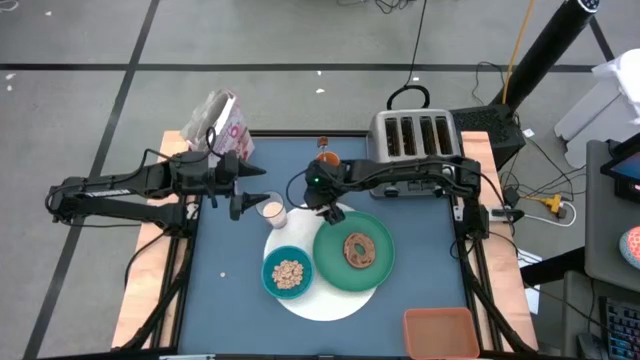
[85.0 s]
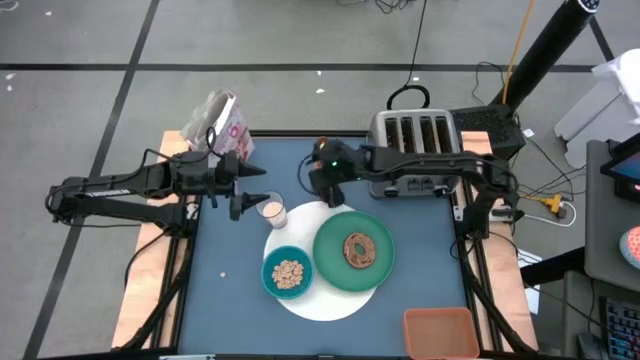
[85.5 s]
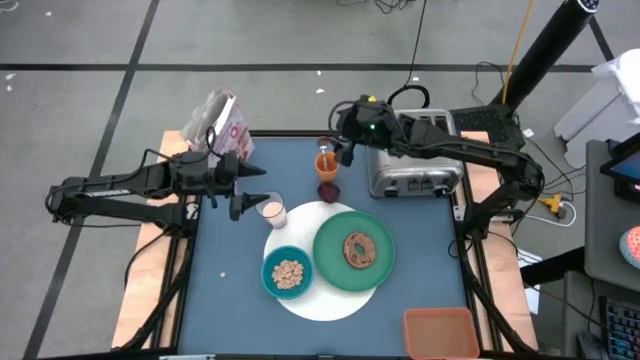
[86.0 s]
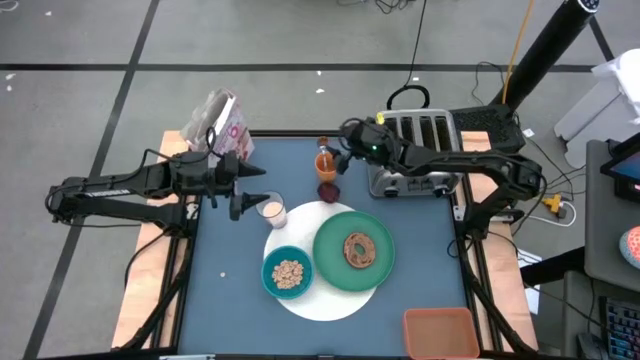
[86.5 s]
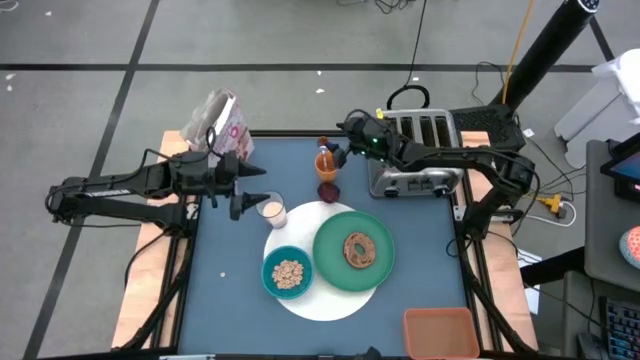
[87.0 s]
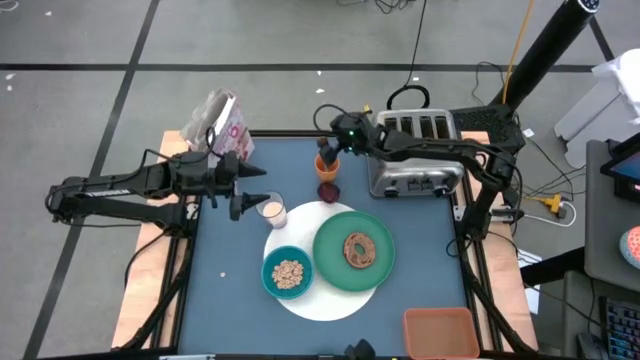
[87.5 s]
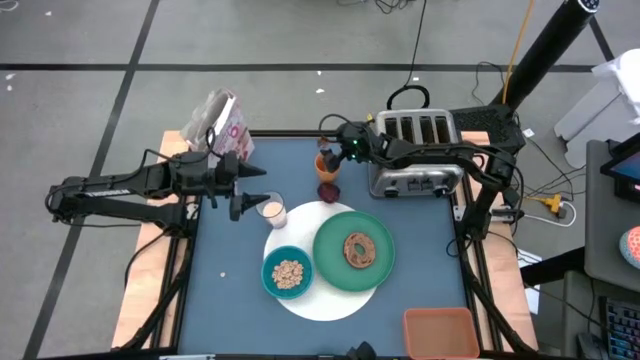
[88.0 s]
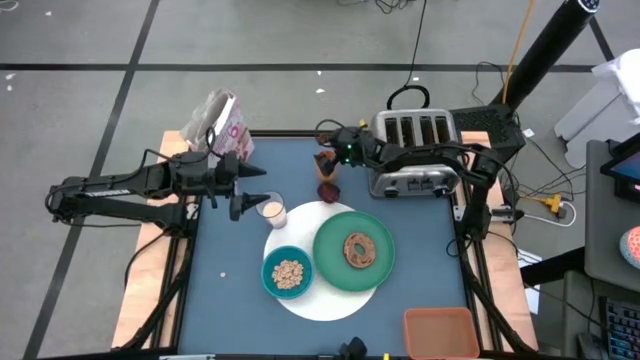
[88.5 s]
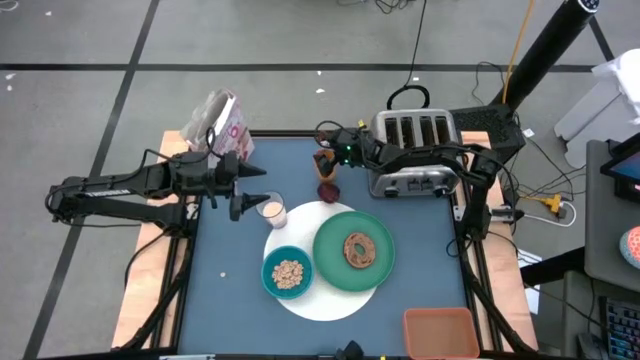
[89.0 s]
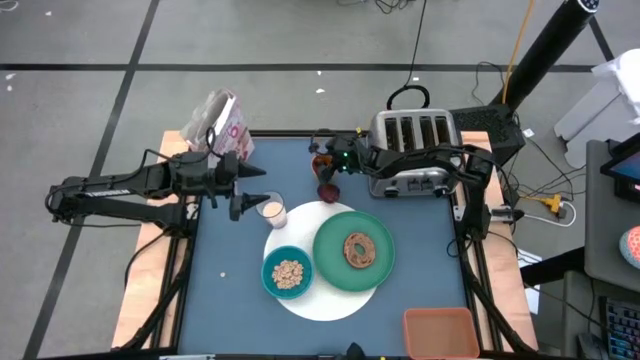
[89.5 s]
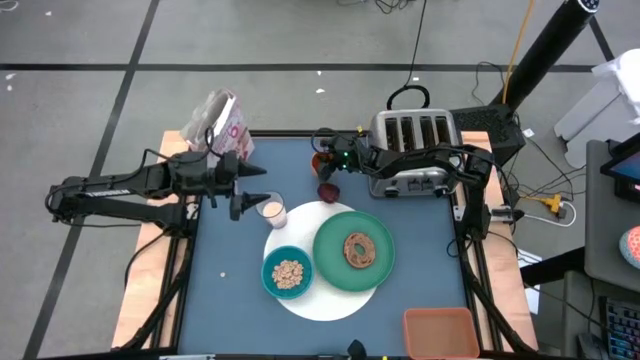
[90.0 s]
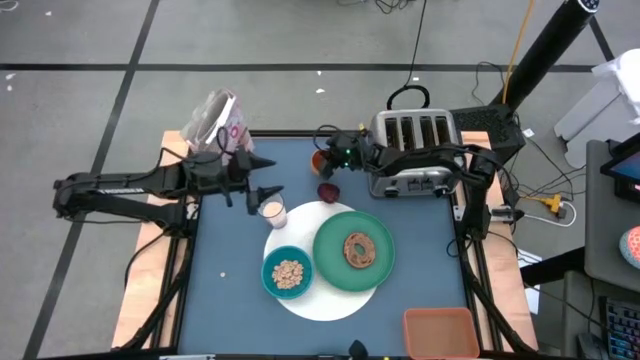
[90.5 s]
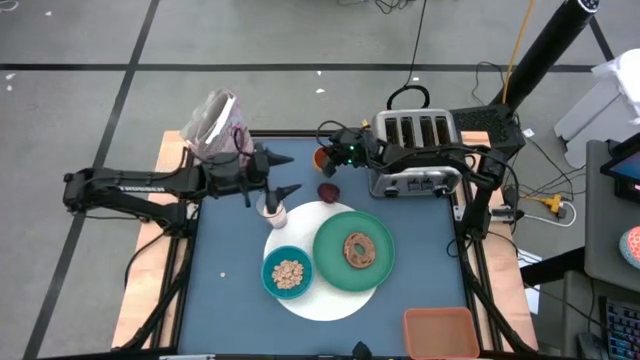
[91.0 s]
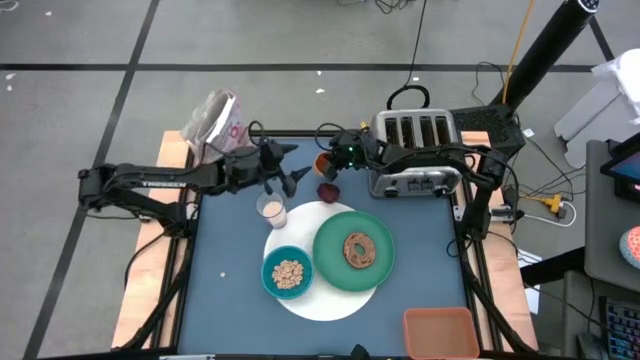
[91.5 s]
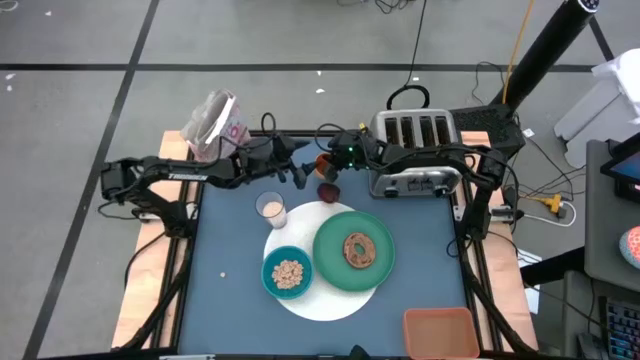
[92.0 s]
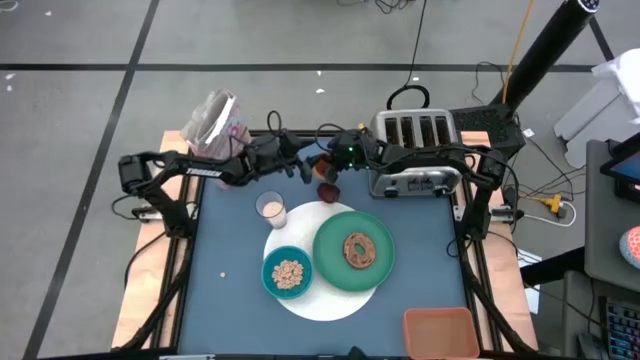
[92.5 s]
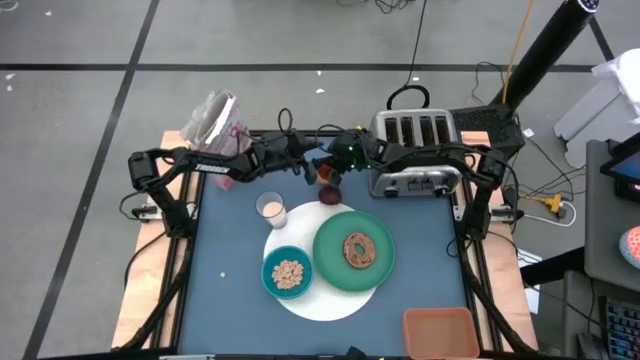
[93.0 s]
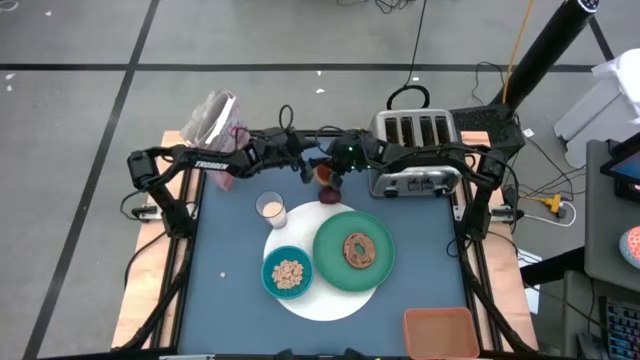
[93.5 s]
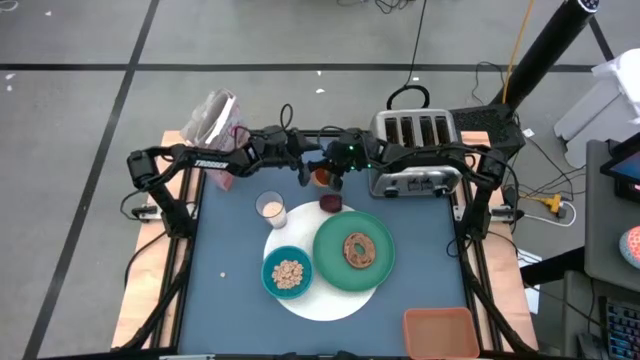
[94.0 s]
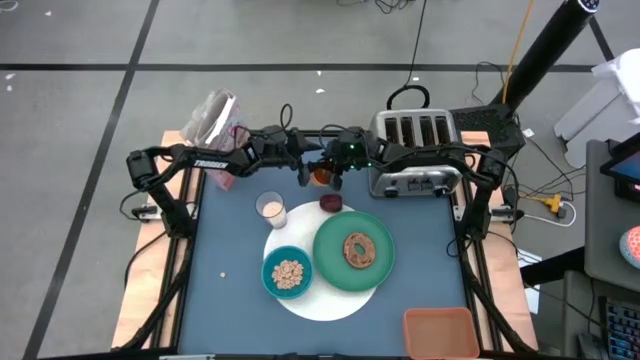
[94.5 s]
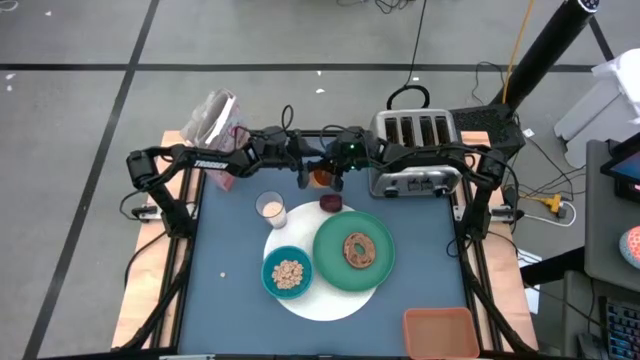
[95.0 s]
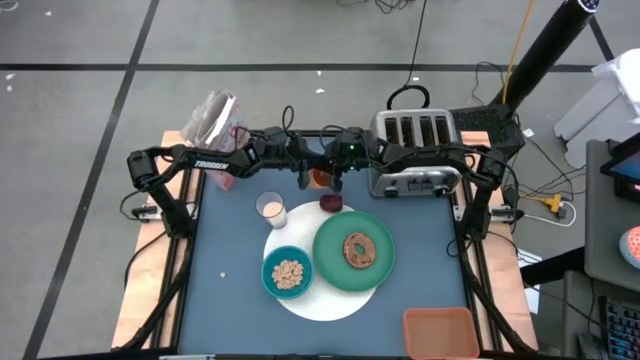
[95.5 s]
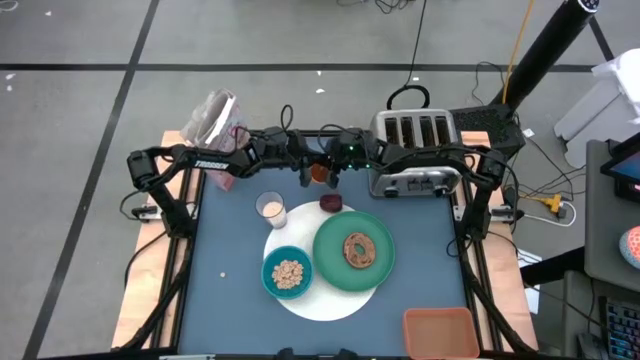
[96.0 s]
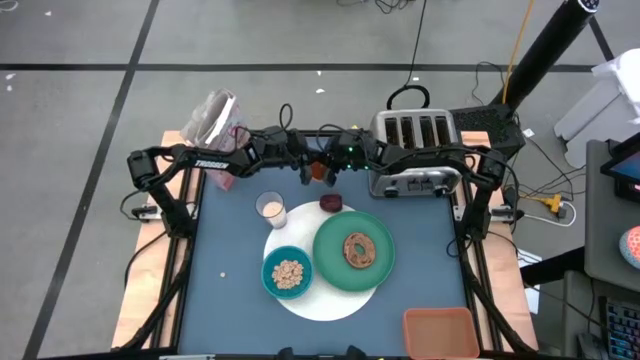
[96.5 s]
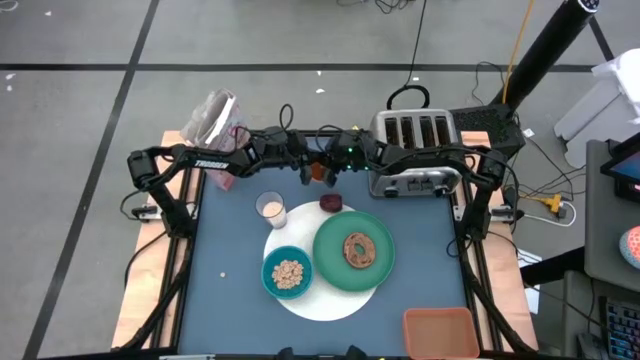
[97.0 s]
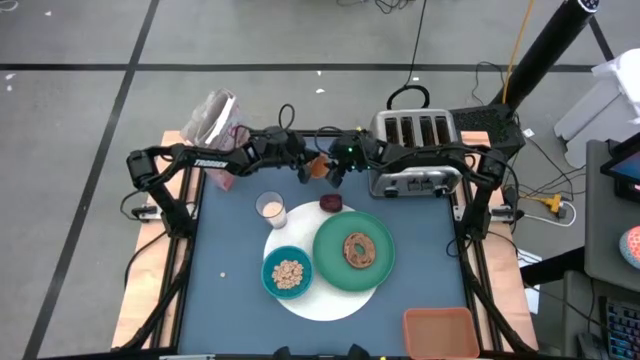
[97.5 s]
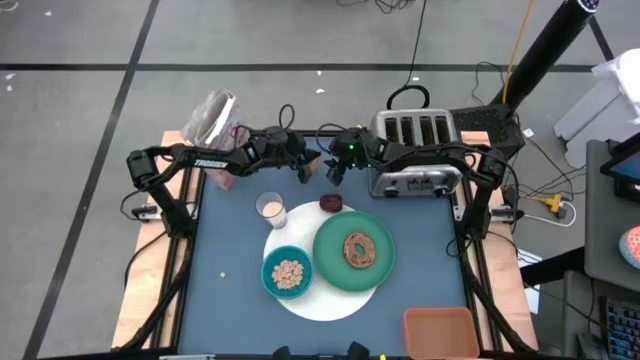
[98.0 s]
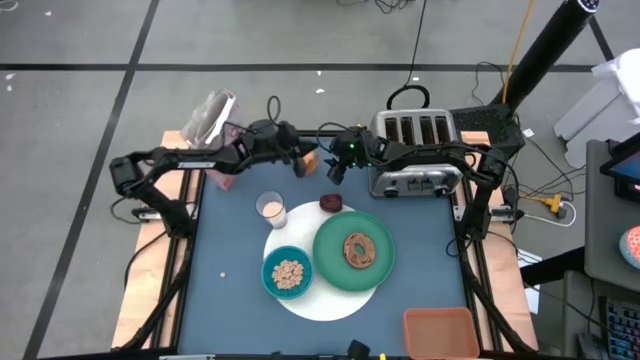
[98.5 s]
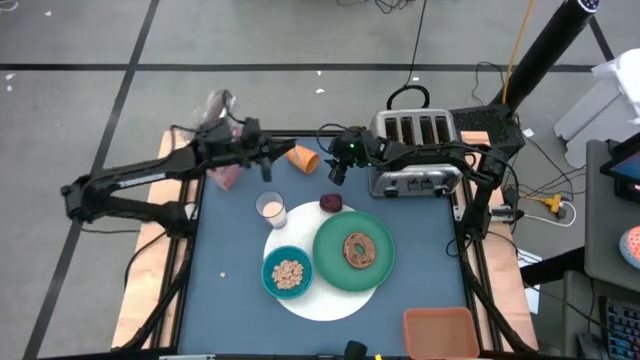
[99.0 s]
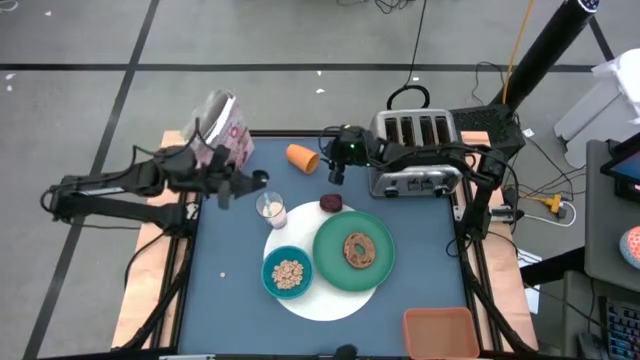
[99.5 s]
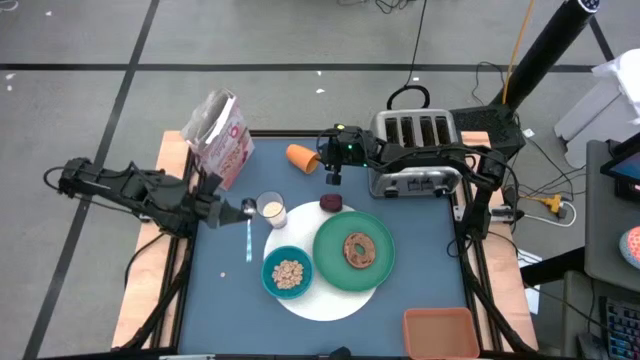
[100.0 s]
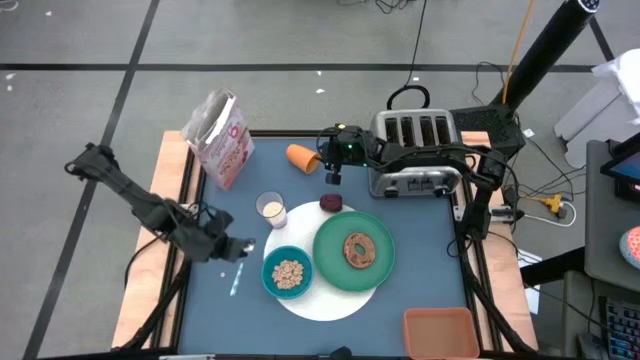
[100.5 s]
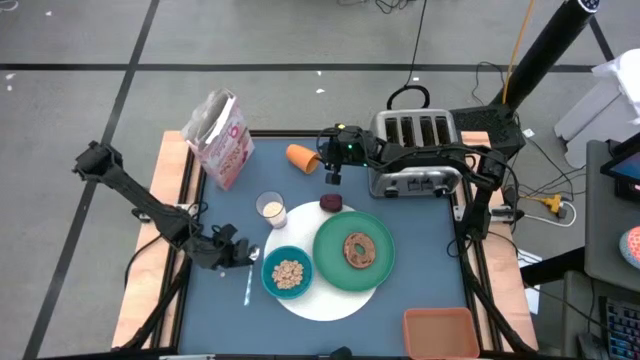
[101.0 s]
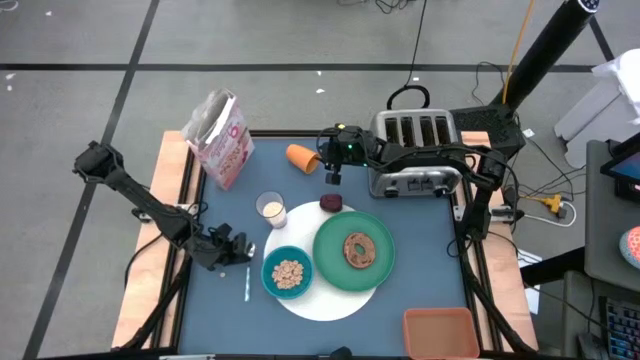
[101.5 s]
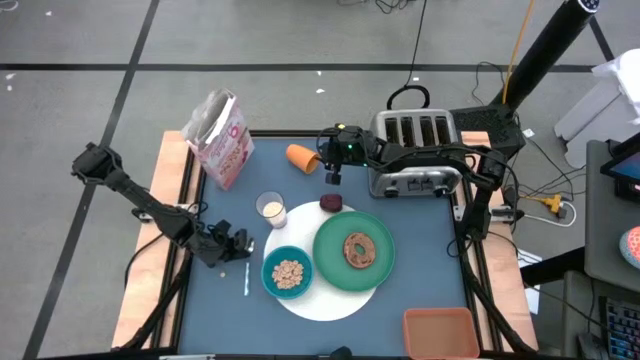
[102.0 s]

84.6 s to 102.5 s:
Task: Arrange a breakfast setting
Put the blue patterned spoon on the table to the left of the white placemat

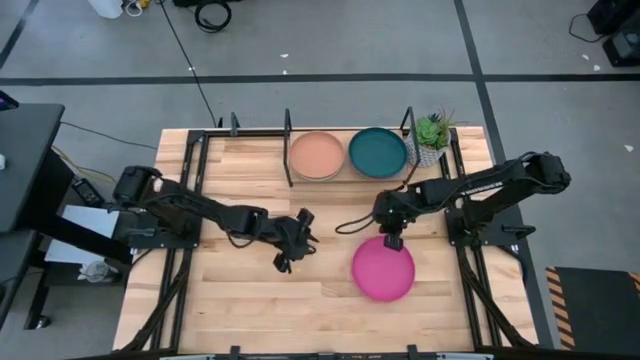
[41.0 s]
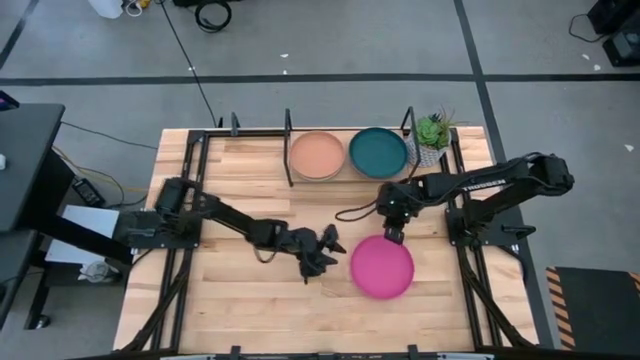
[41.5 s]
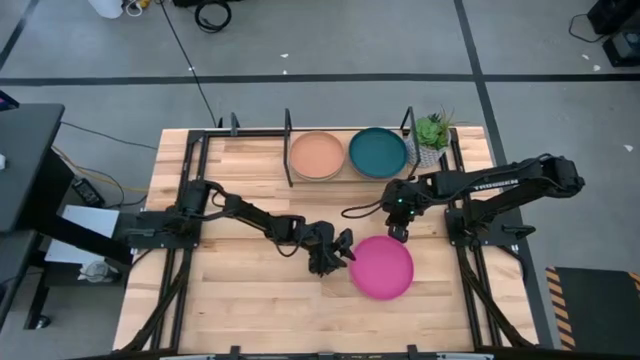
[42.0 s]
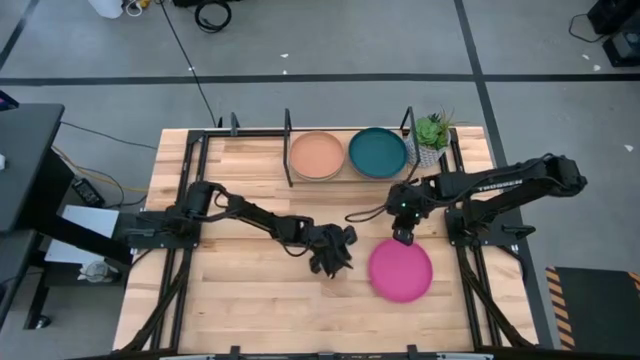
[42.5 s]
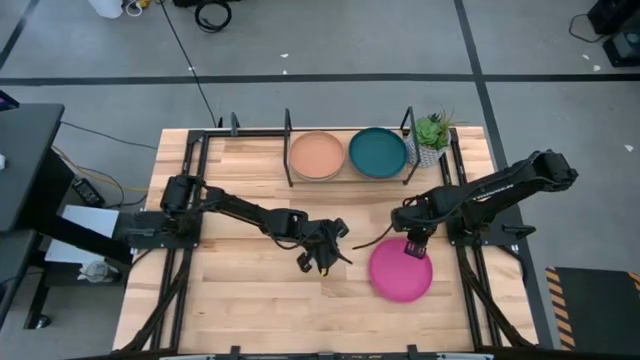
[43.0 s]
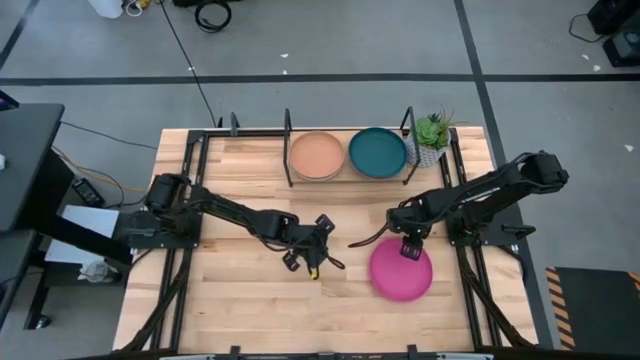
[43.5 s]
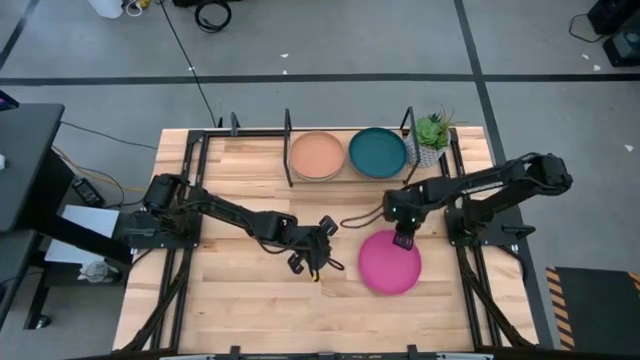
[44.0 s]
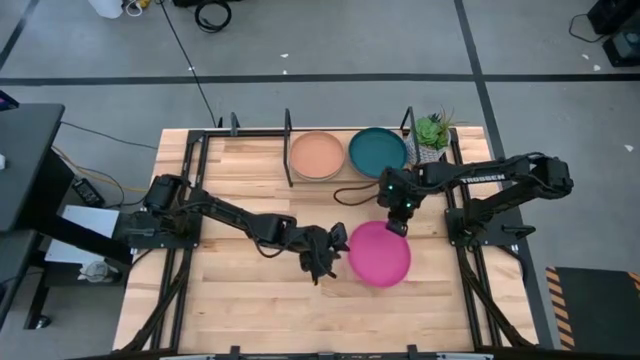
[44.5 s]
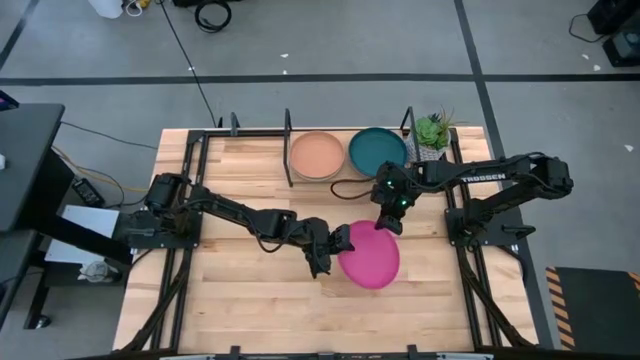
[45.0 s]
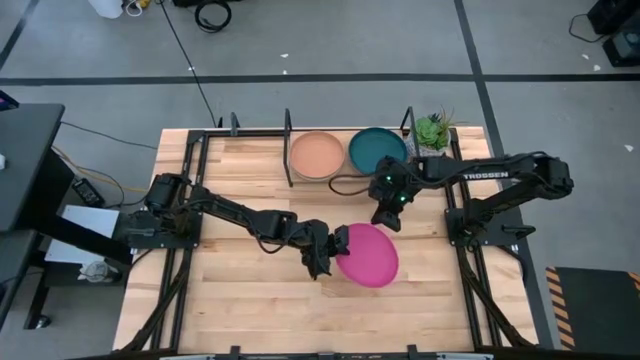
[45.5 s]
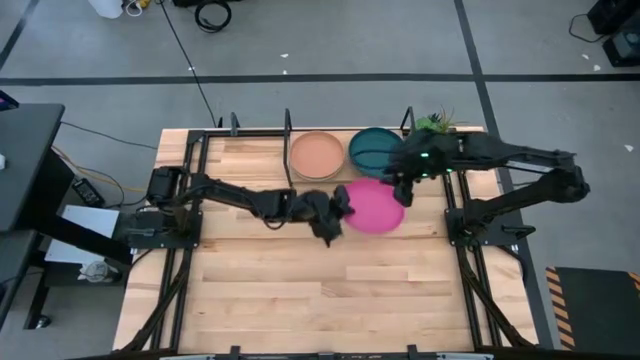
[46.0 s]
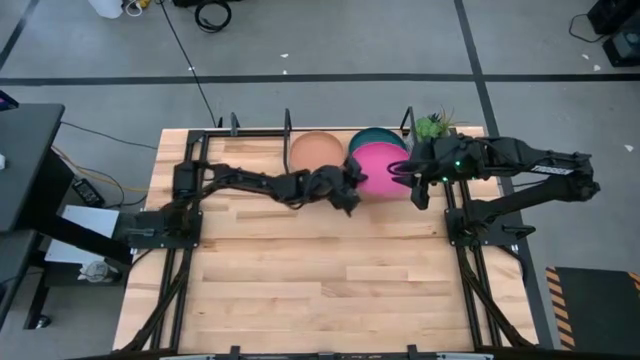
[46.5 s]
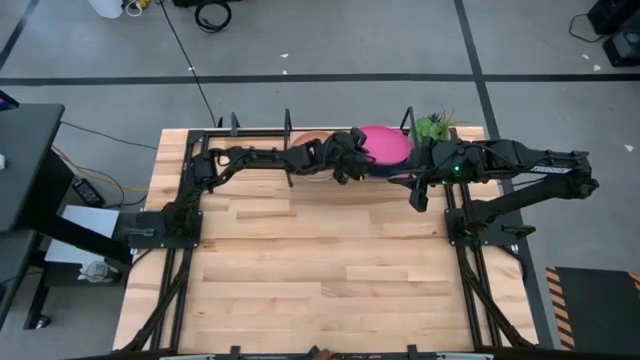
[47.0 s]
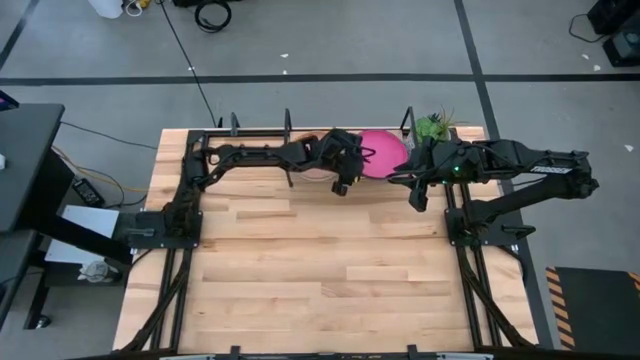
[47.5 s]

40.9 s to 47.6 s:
Task: Place and stack plates onto a shelf
Stack the pink plate on top of the dark blue plate on the shelf
